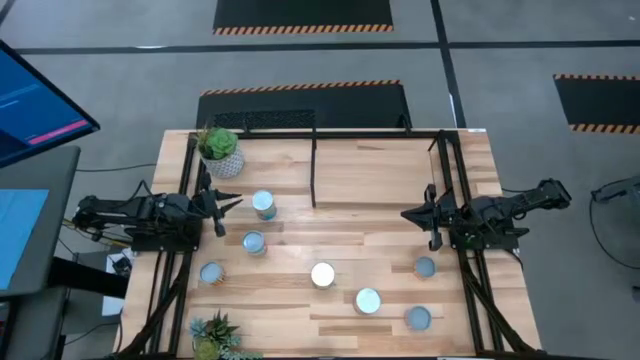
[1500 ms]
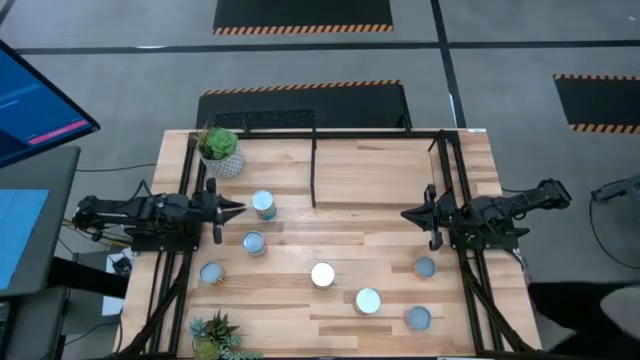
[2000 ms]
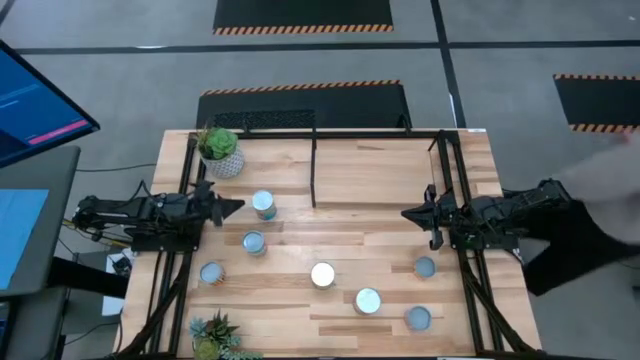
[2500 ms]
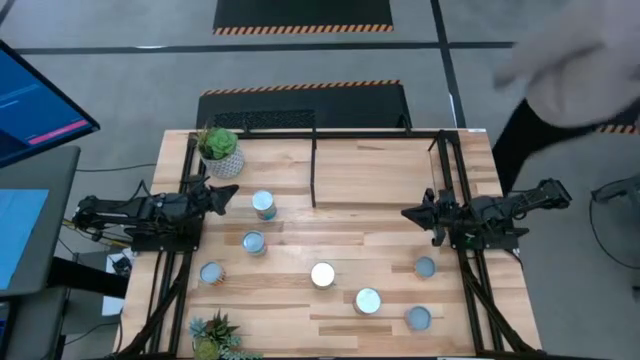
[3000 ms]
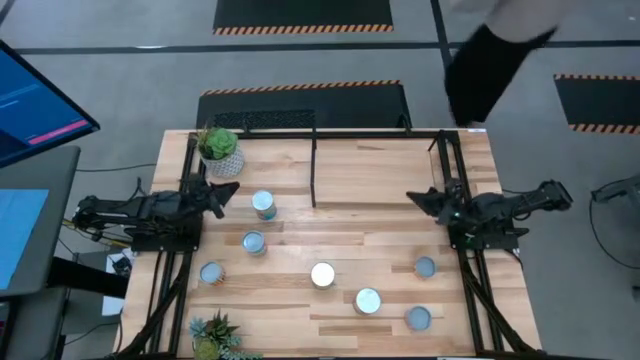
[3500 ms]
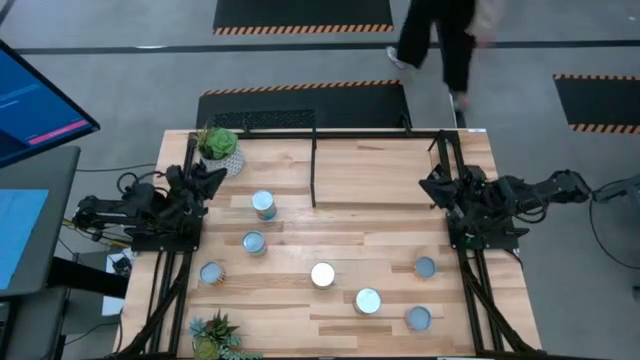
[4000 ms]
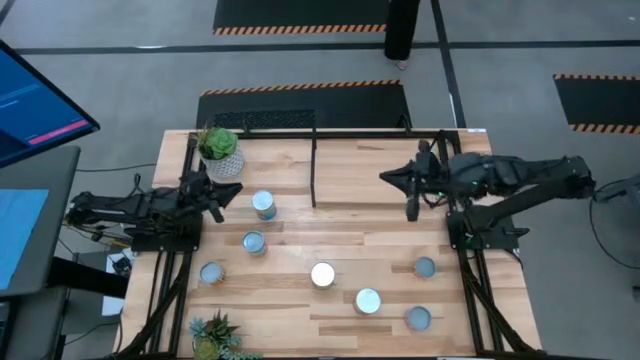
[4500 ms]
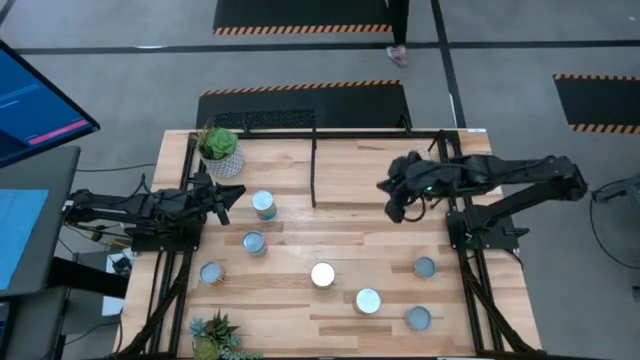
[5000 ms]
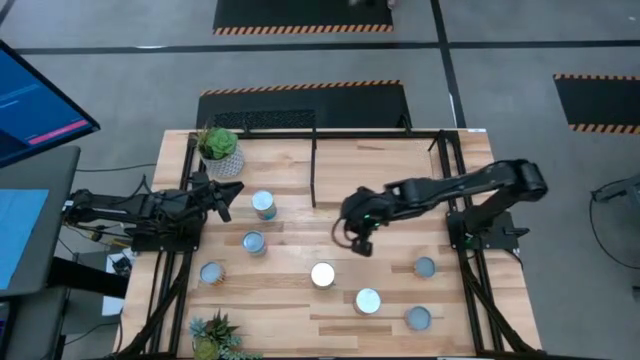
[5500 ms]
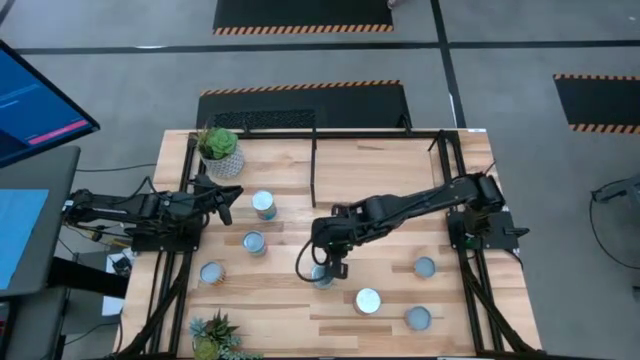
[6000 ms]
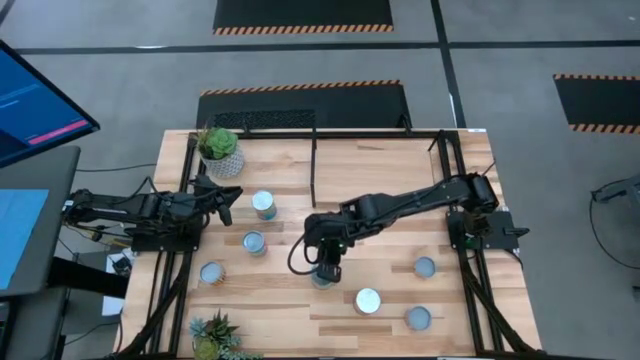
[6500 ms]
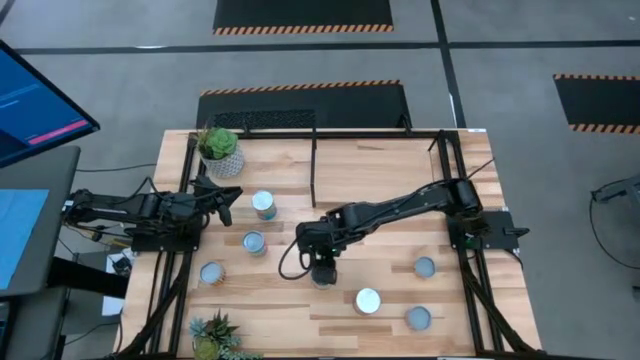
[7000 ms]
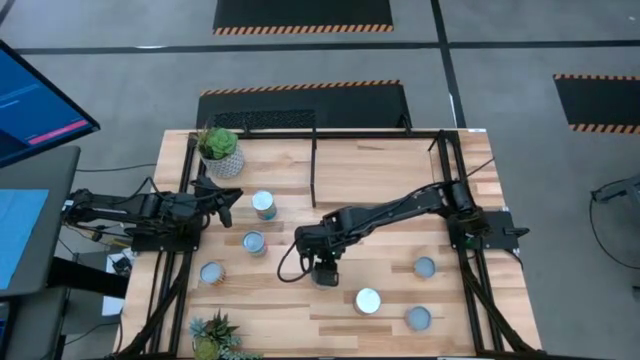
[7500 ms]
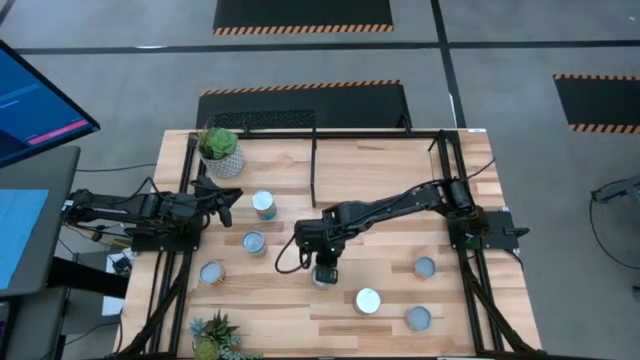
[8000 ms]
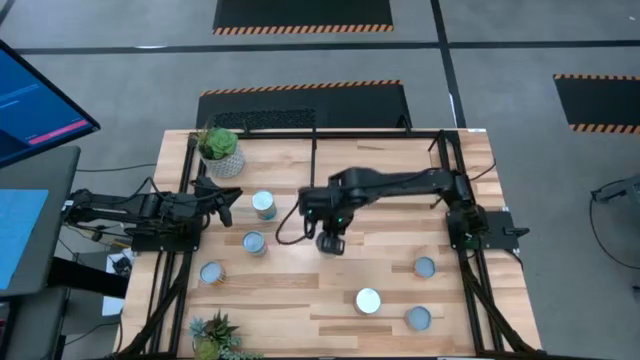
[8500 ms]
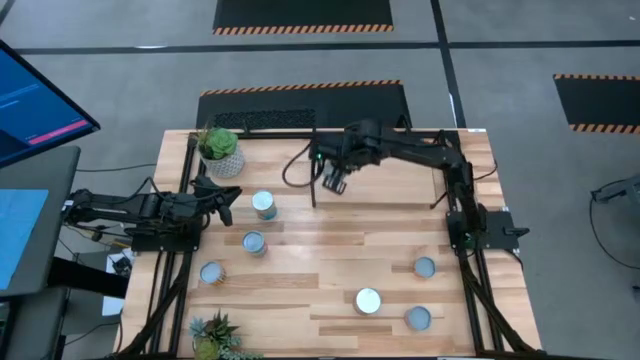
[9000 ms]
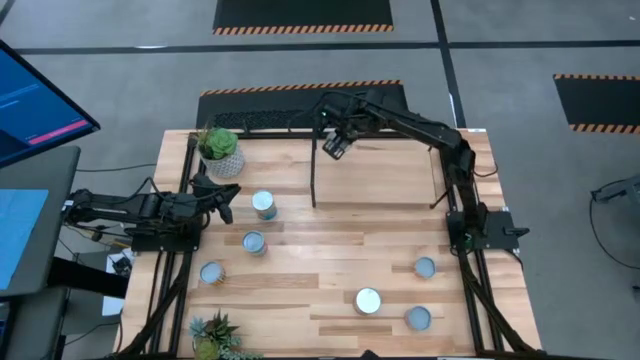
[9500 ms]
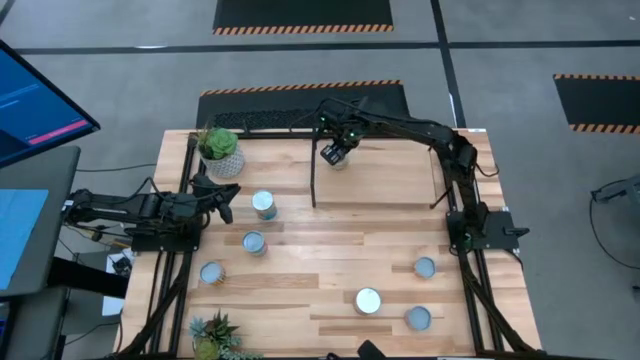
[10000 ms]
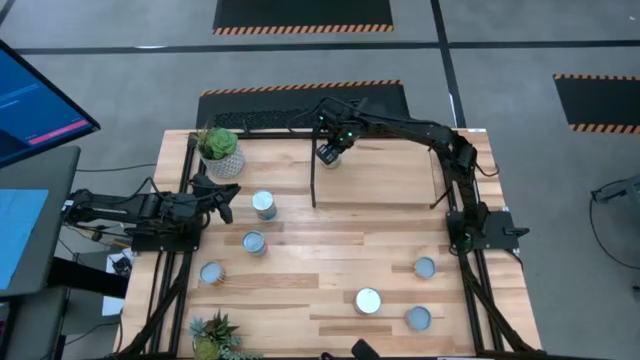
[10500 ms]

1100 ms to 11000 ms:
Task: Pick and place cans onto a shelf
Put the canned pears on the shelf

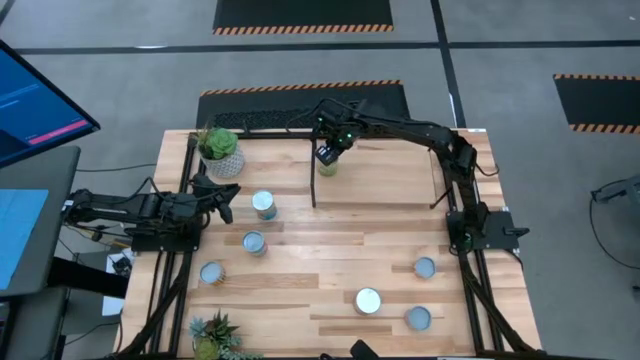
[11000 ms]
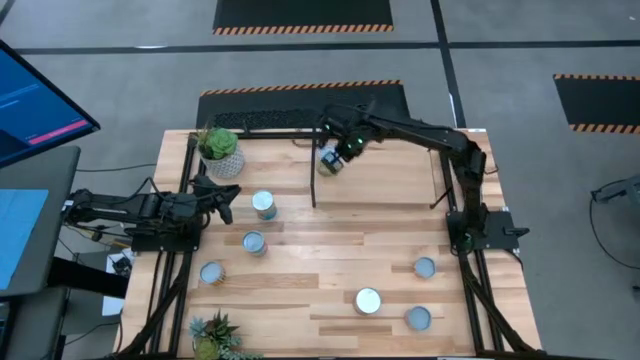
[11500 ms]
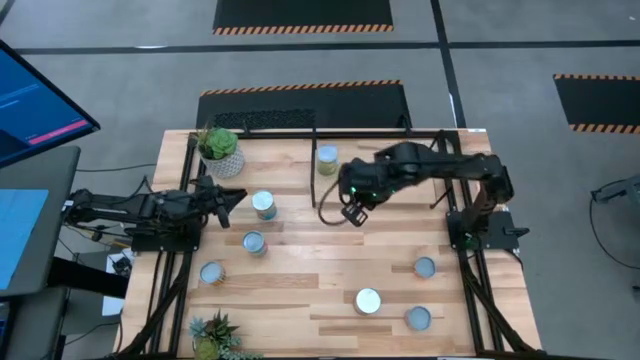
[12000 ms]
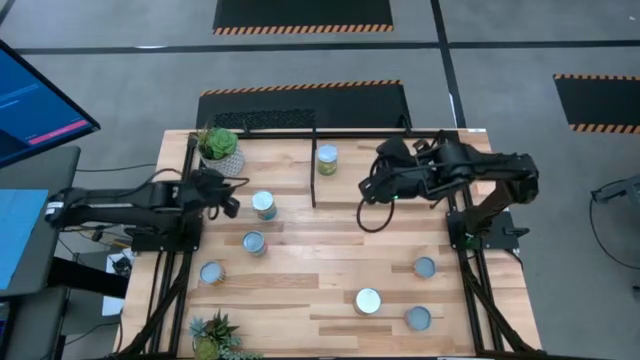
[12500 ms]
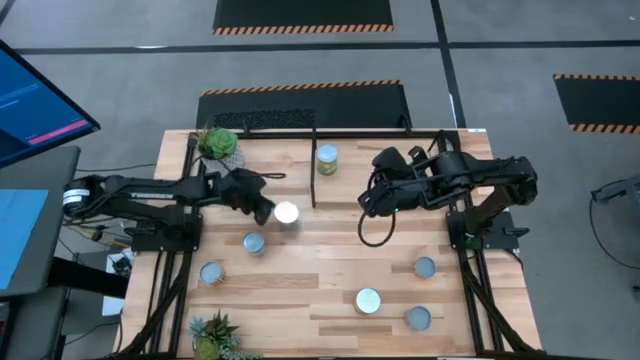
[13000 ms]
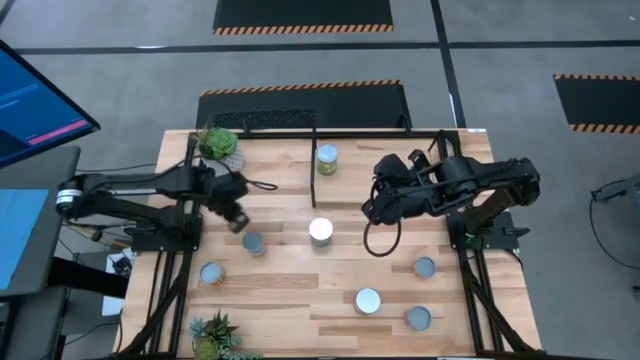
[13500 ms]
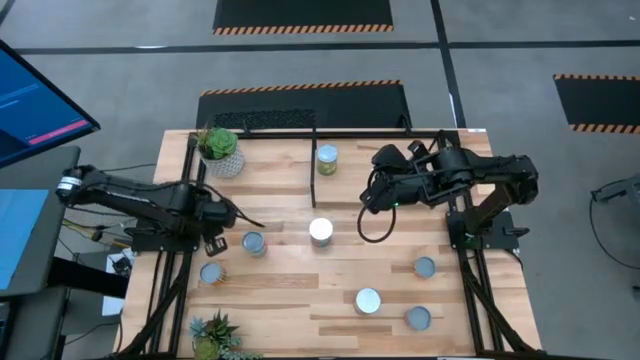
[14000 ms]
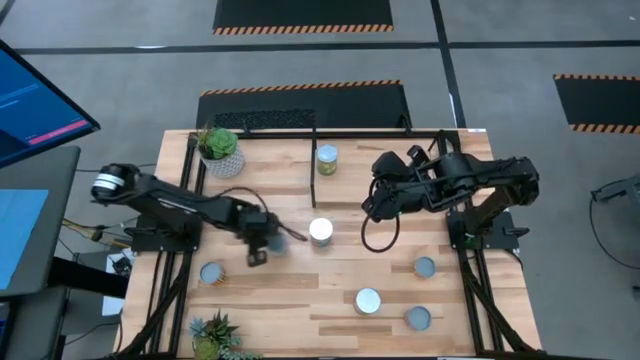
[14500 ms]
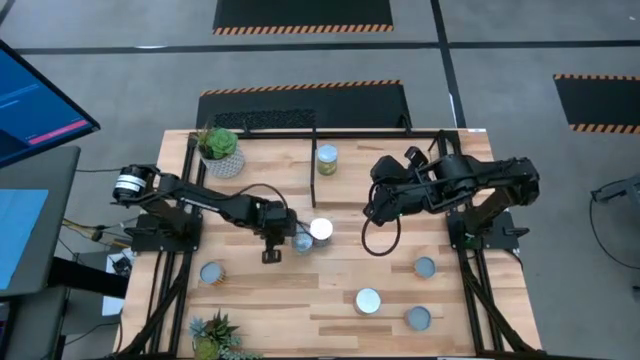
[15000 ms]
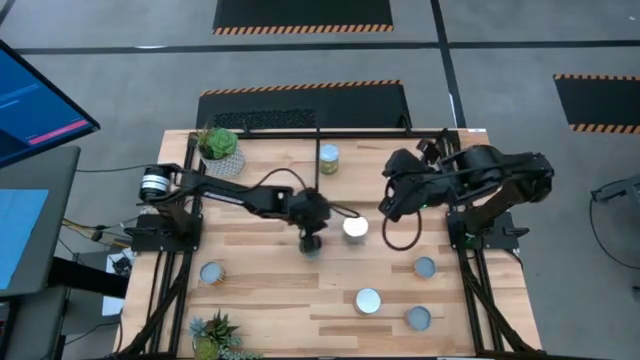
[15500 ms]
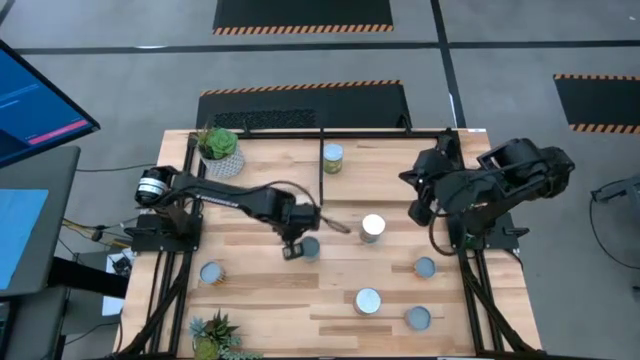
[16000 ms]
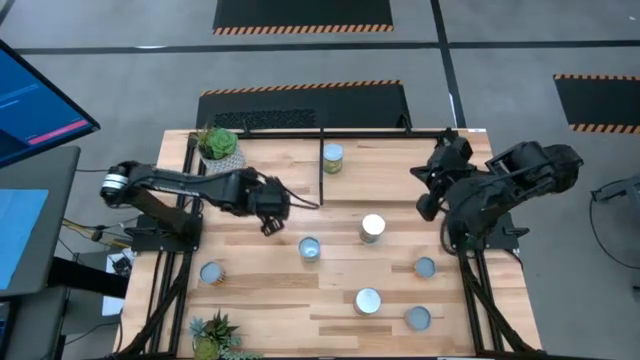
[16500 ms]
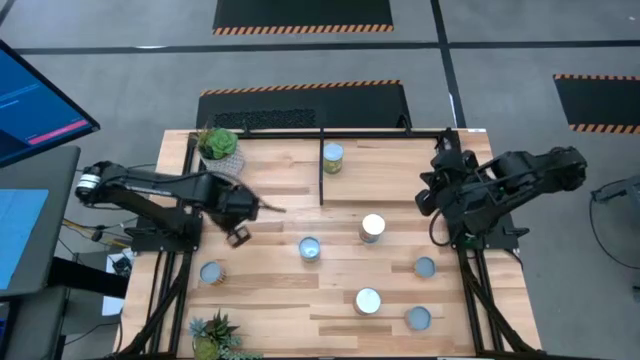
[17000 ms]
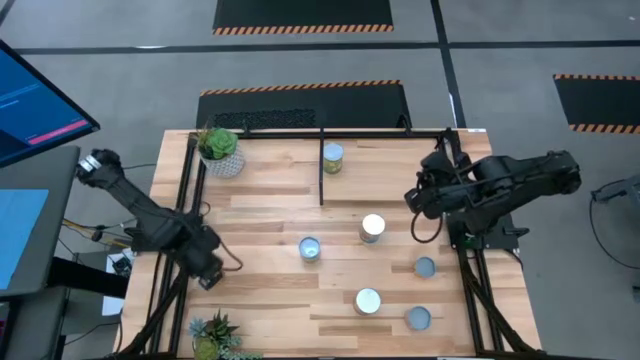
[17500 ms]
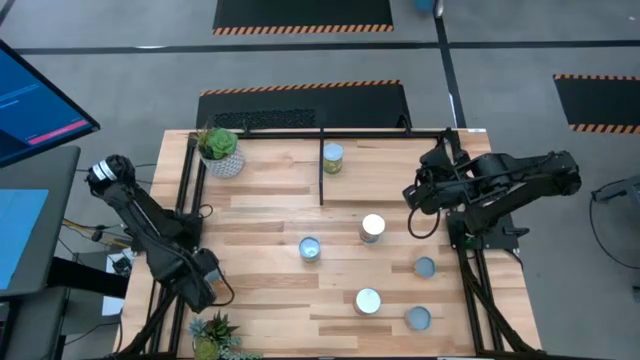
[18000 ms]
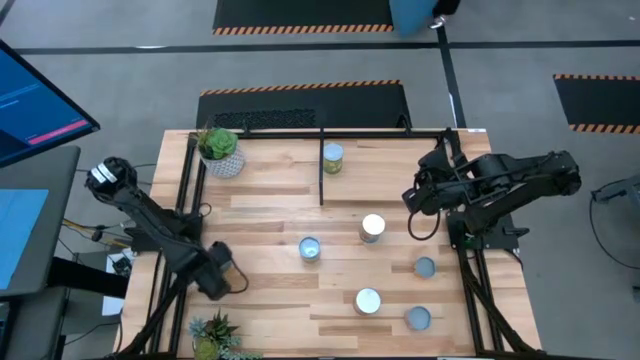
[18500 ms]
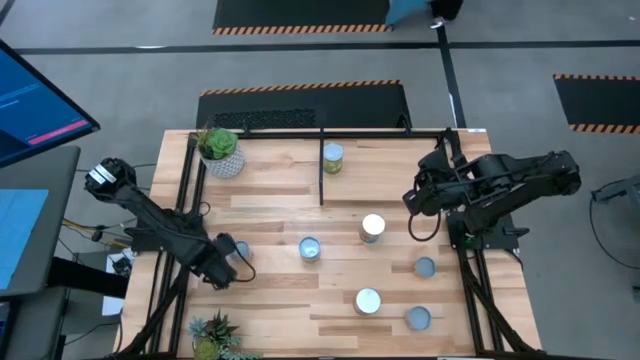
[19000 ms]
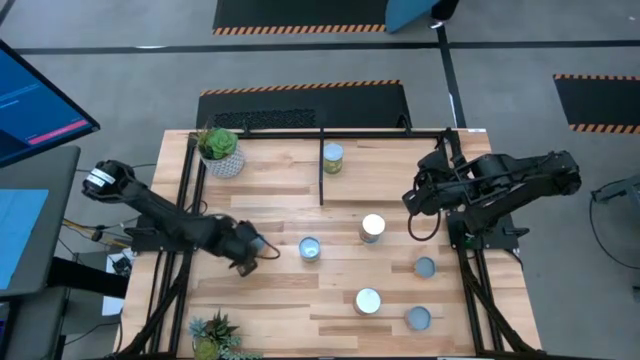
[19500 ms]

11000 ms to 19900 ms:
Move the canned goods to the center

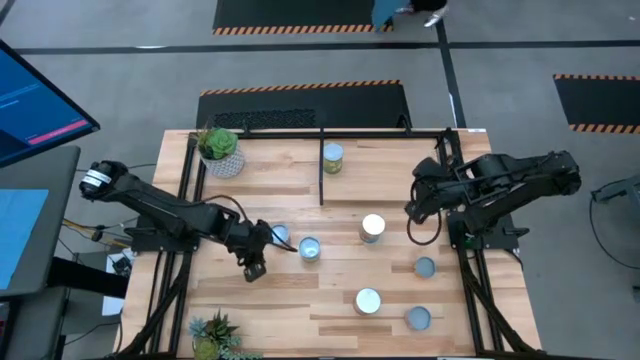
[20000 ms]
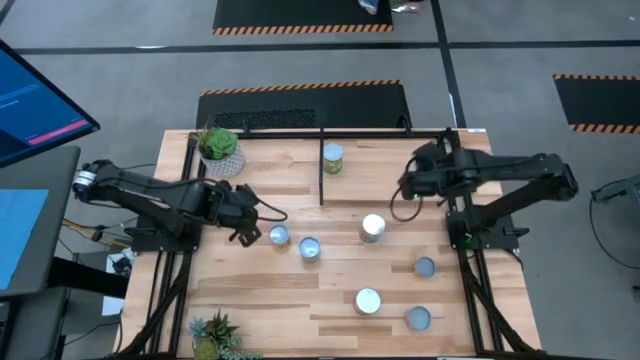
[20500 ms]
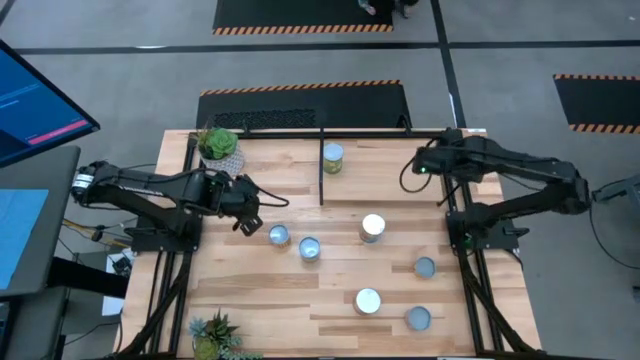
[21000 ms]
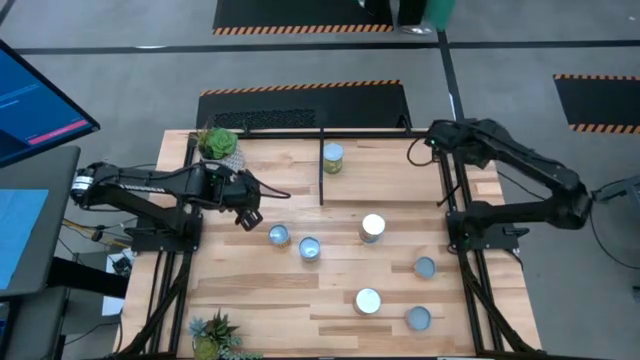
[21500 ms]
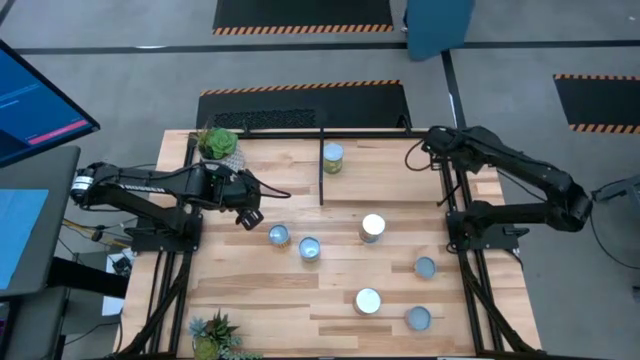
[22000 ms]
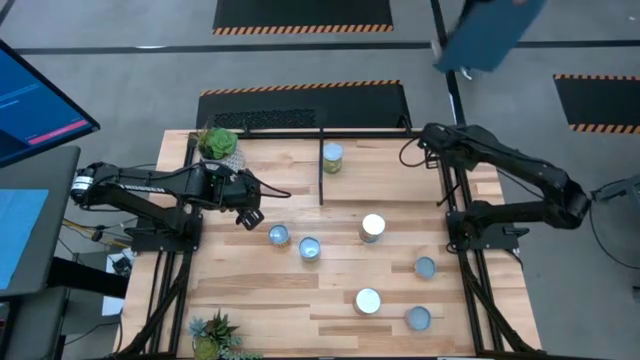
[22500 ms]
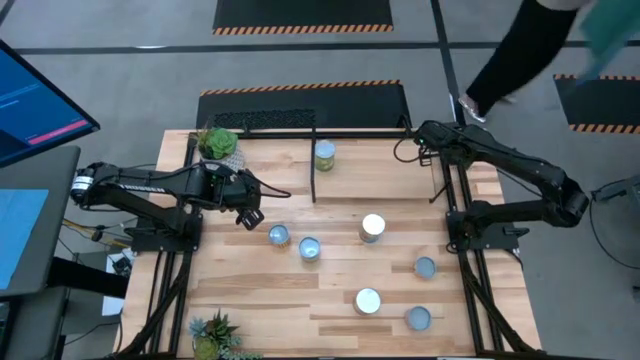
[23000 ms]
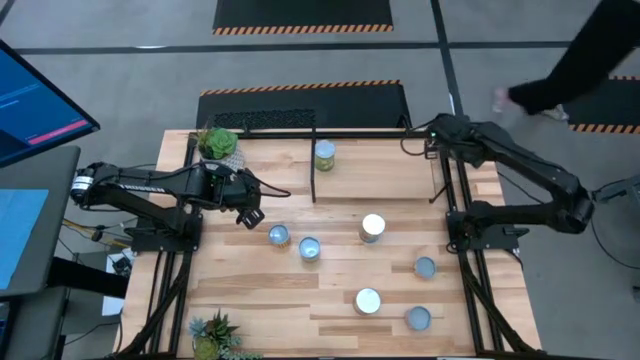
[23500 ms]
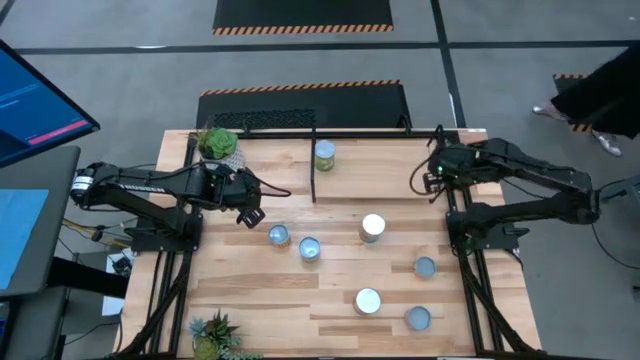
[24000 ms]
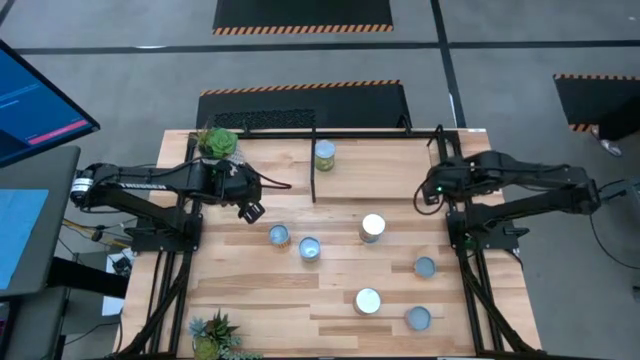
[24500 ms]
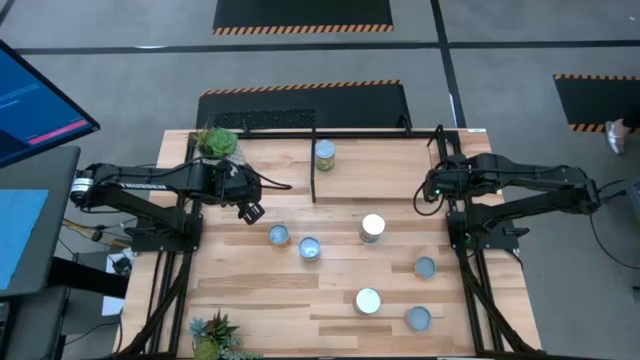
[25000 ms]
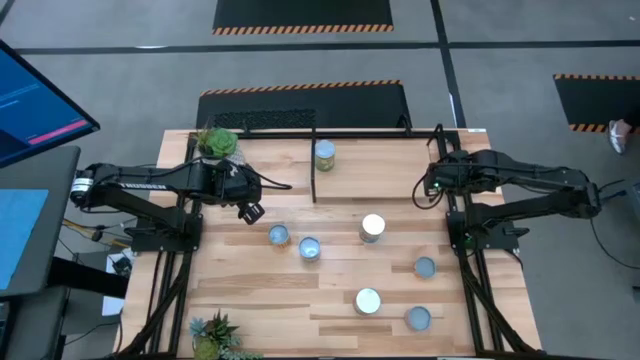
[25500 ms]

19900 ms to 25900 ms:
Adjust the shelf
